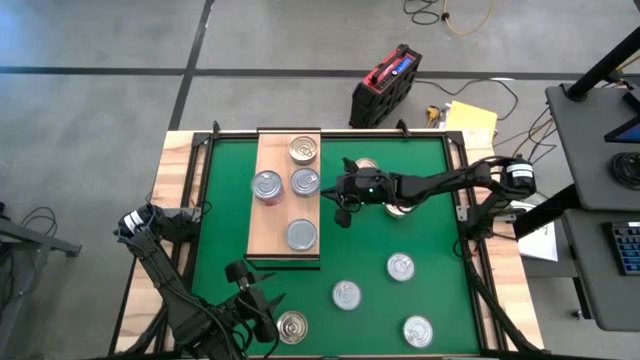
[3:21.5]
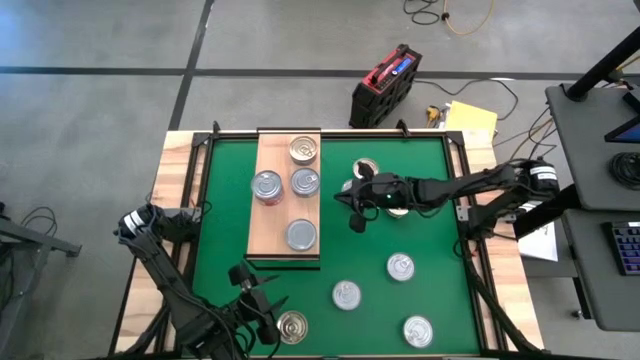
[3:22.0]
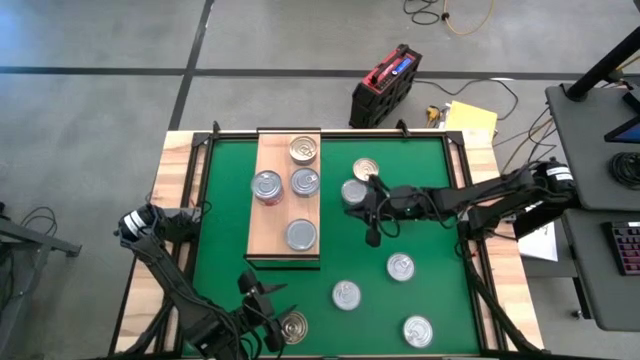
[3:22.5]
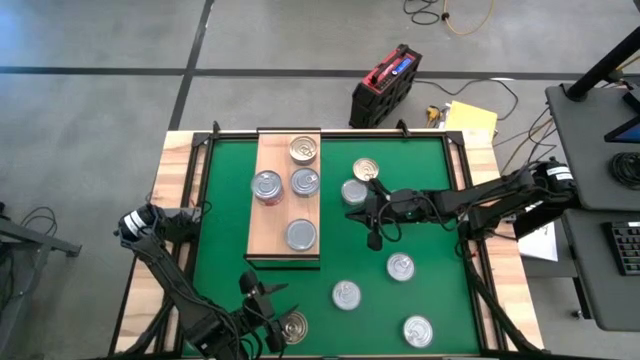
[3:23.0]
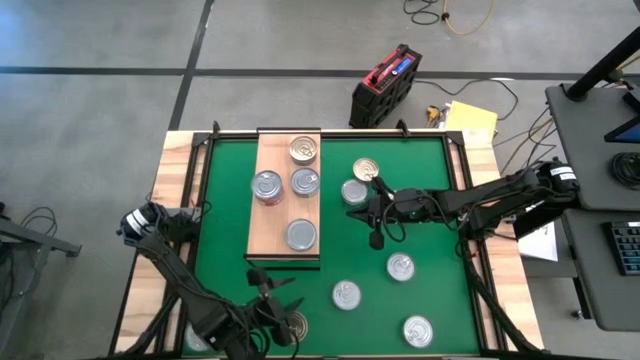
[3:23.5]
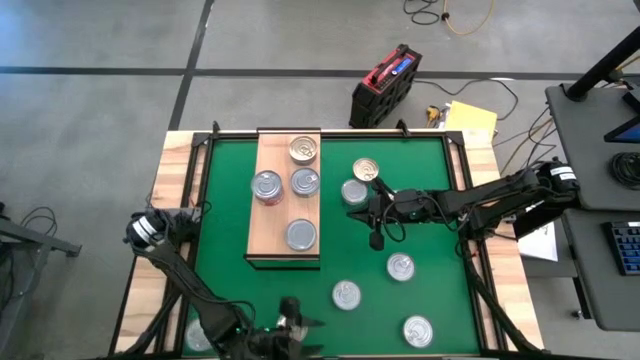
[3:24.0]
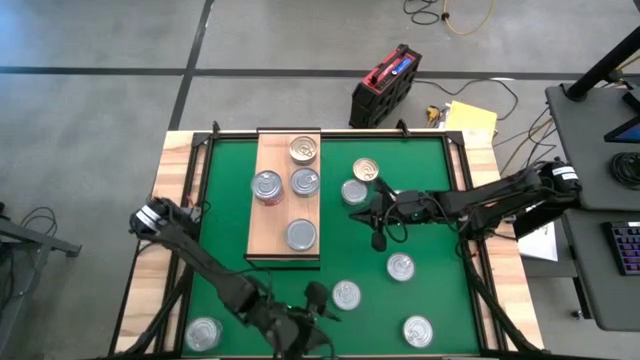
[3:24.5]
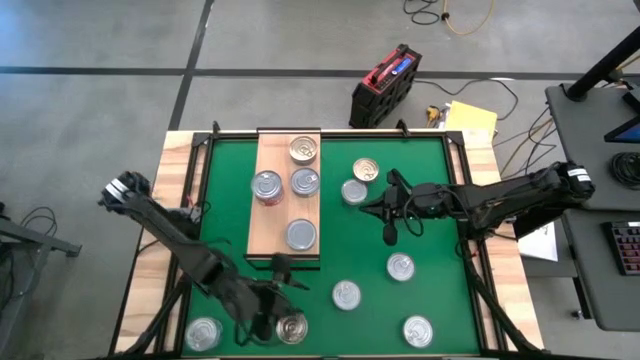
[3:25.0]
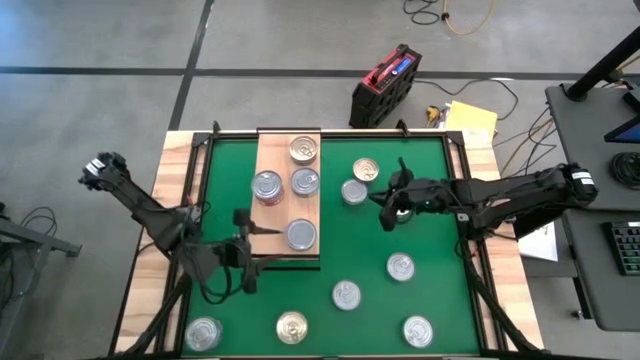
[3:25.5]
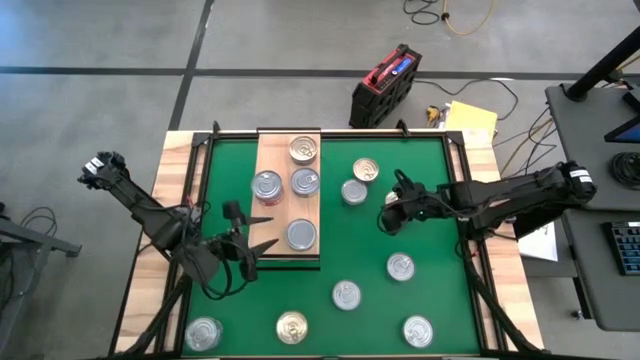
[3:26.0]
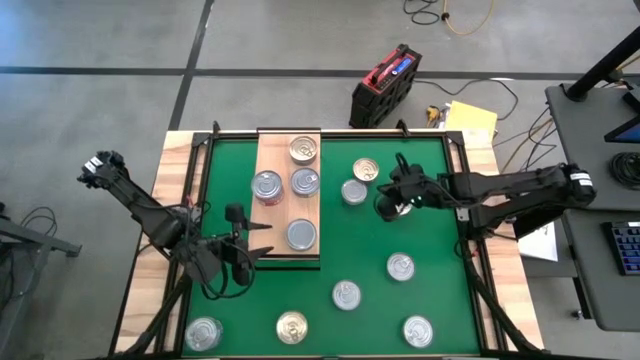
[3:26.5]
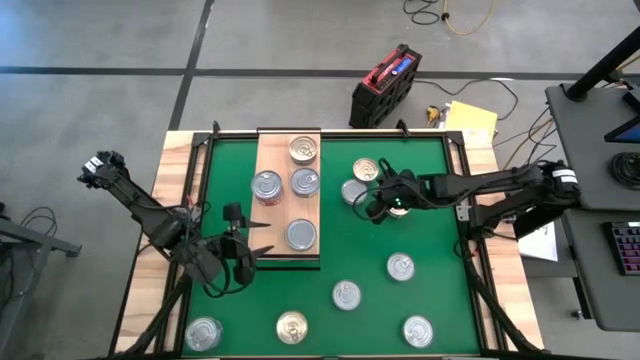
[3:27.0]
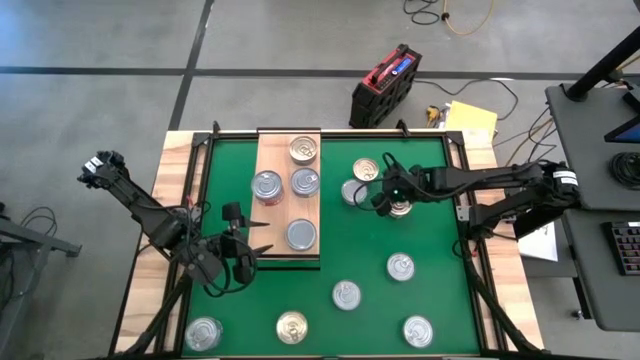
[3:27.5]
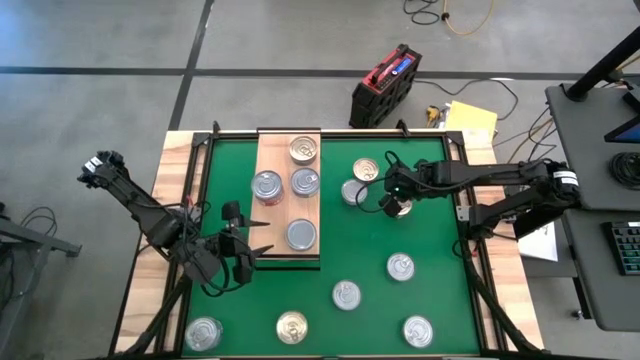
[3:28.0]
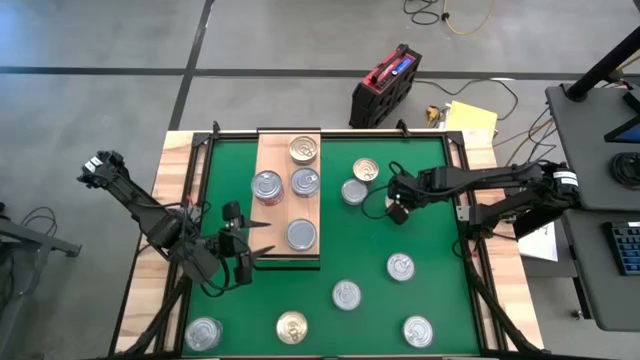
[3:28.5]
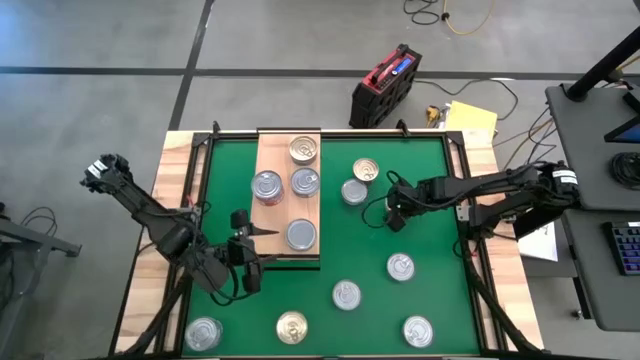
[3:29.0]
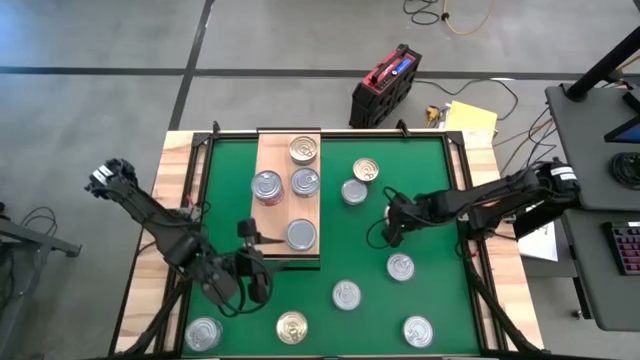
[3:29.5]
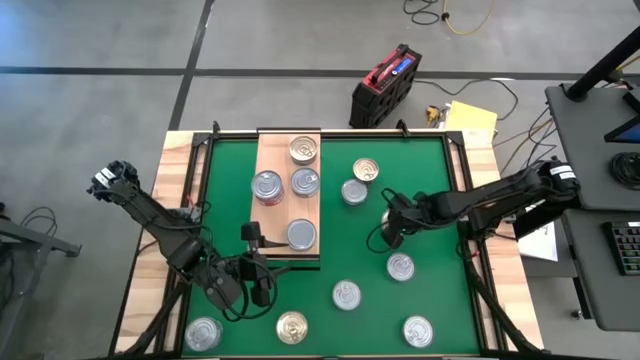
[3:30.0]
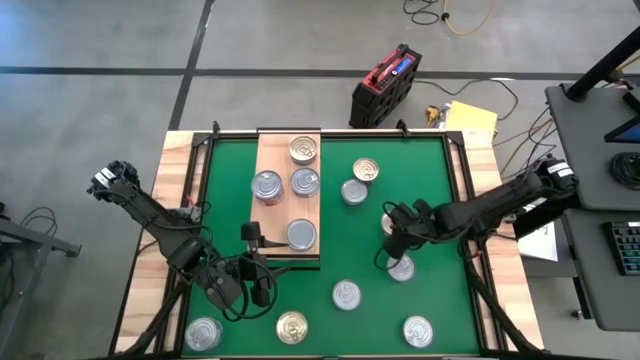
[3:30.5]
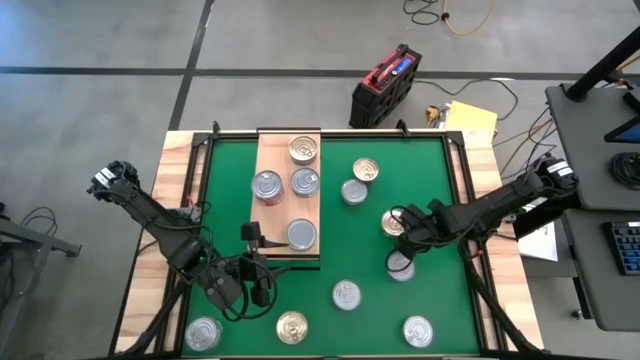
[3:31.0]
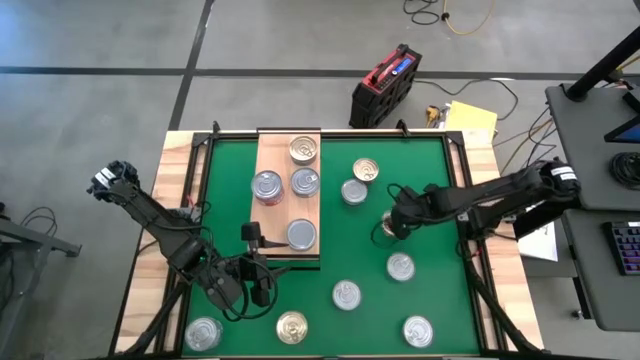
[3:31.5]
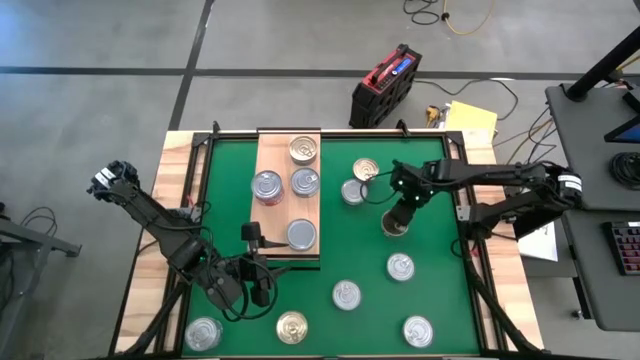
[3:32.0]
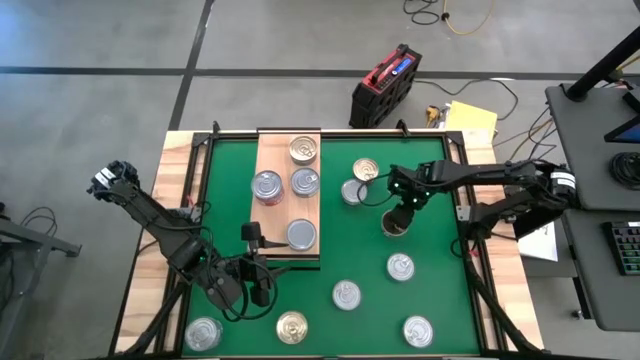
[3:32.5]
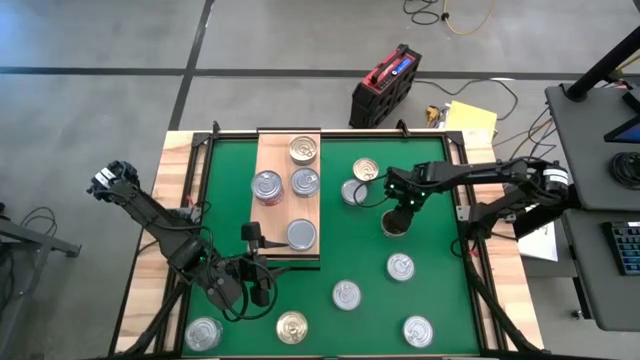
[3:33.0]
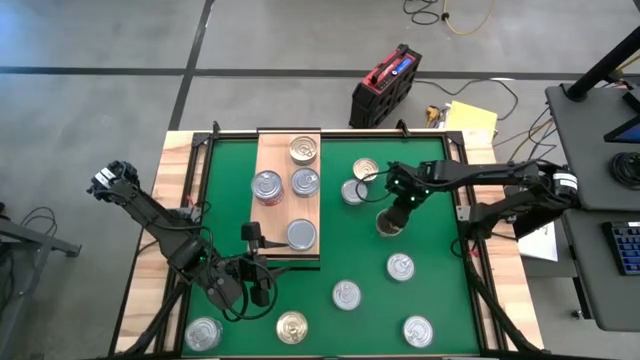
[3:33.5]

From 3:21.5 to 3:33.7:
Task: Stack canned seafood by type on shelf
Stack the blue and pink tuna can on top of the blue tuna can on the shelf

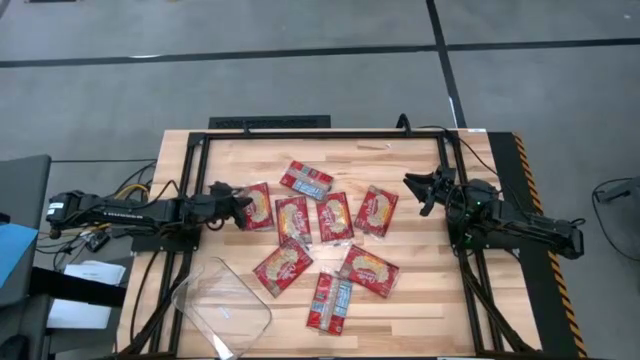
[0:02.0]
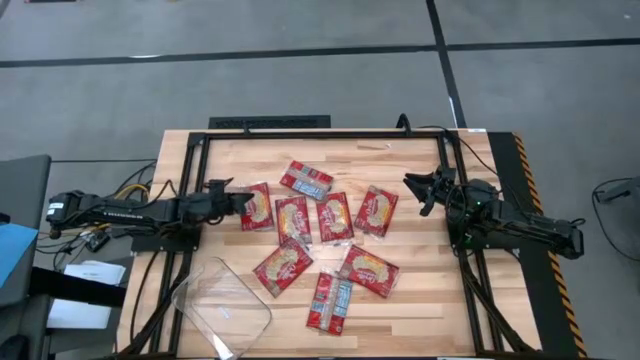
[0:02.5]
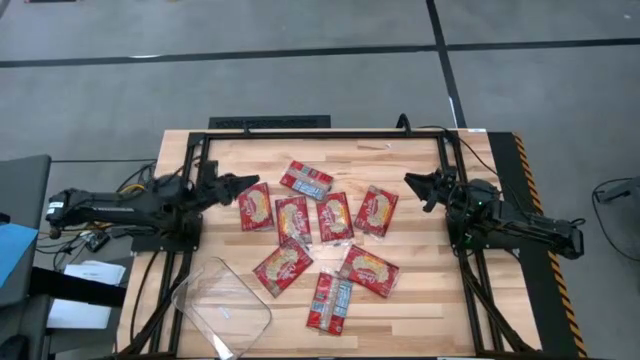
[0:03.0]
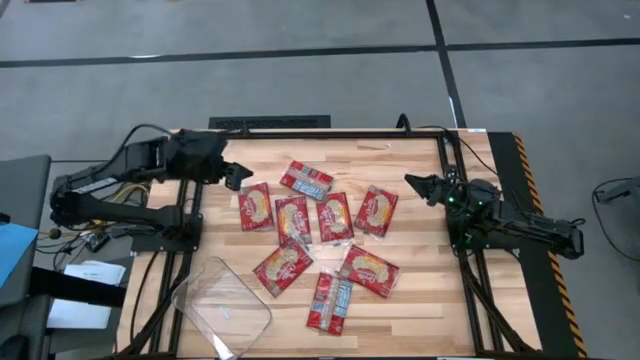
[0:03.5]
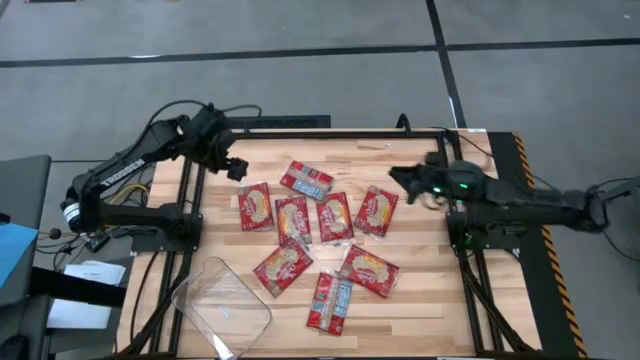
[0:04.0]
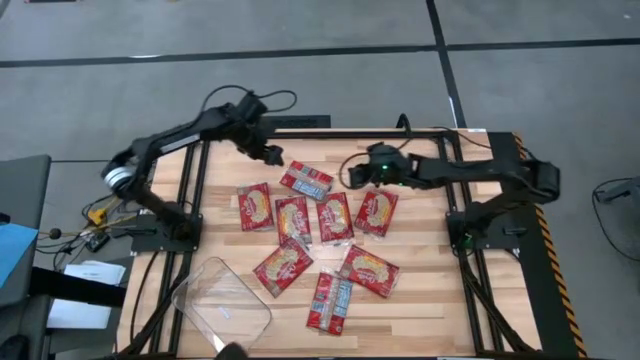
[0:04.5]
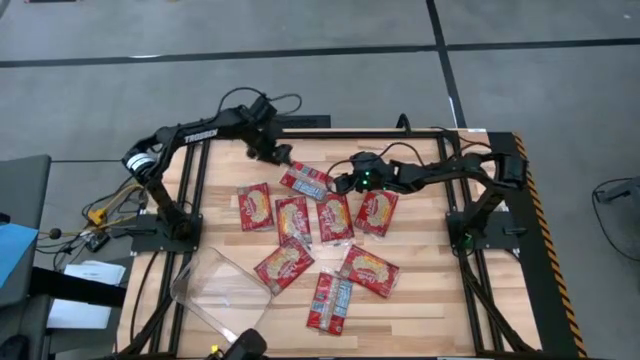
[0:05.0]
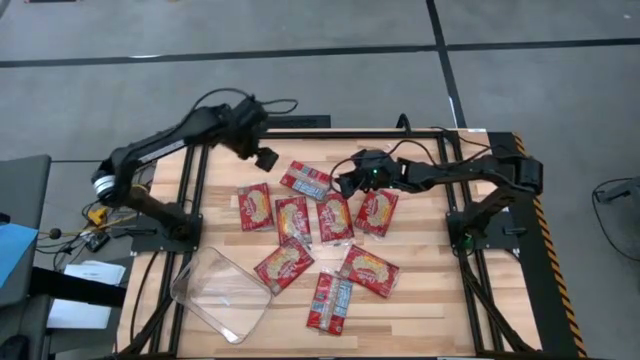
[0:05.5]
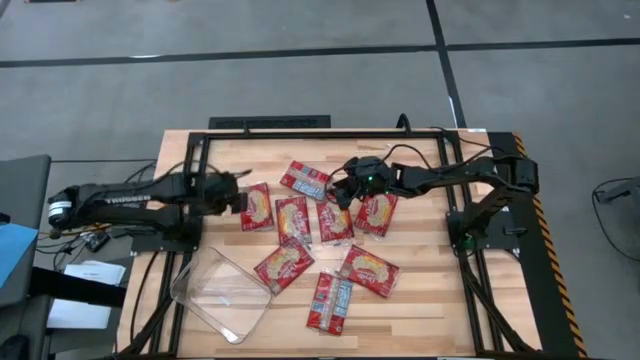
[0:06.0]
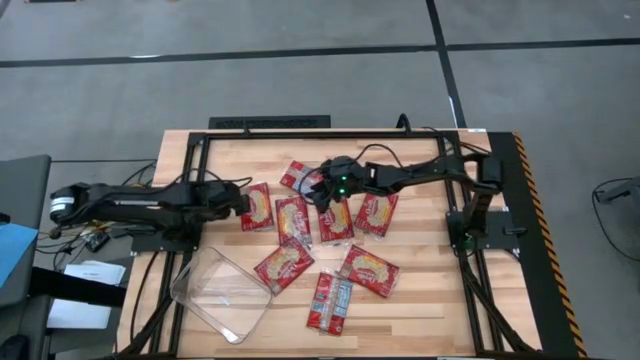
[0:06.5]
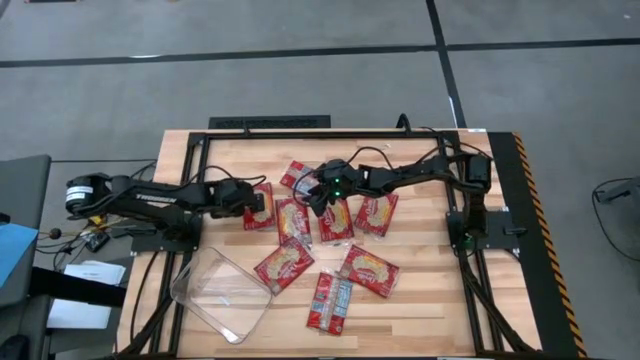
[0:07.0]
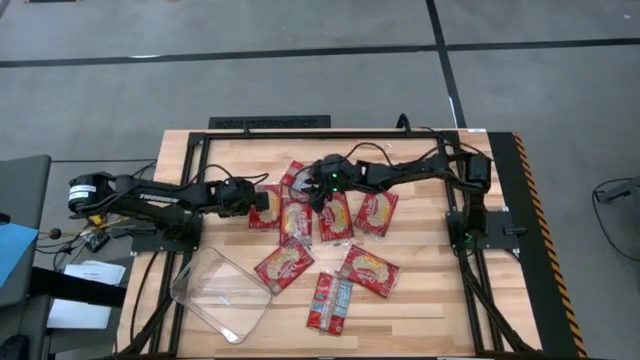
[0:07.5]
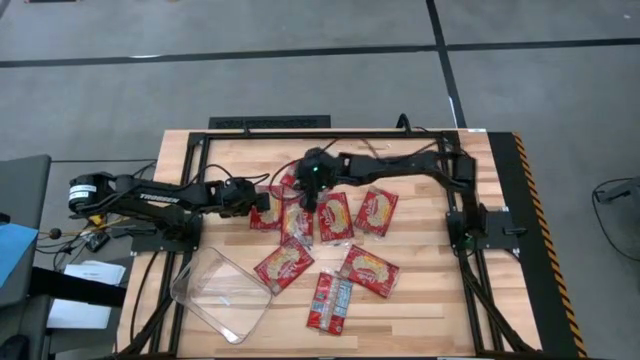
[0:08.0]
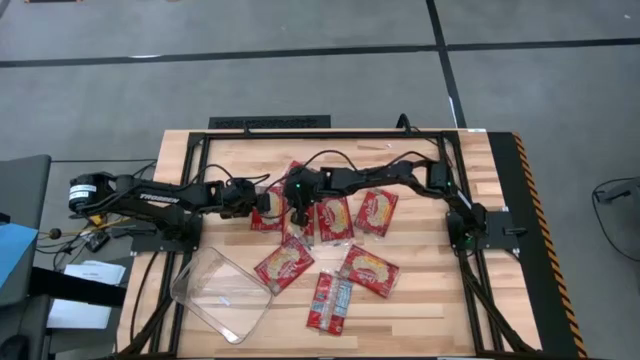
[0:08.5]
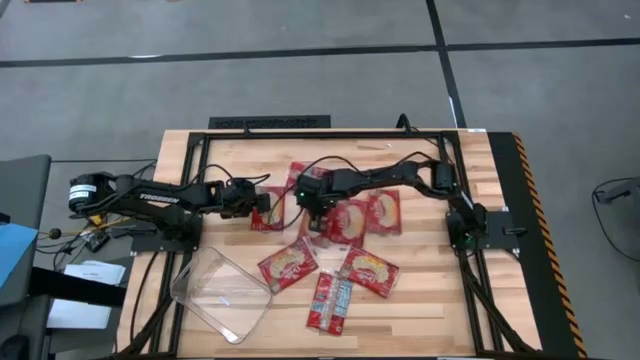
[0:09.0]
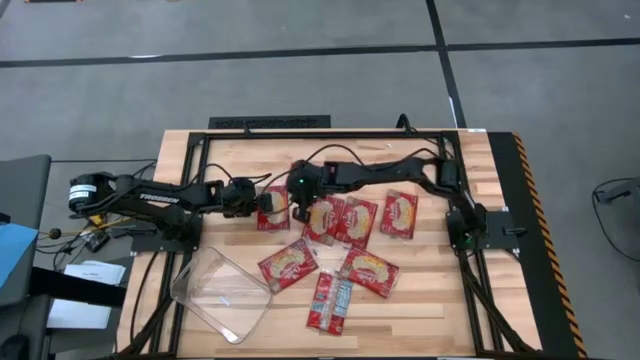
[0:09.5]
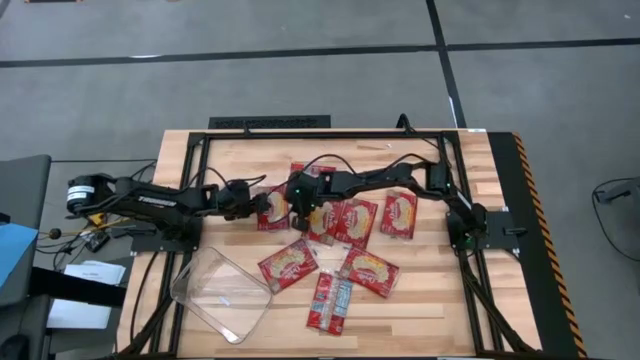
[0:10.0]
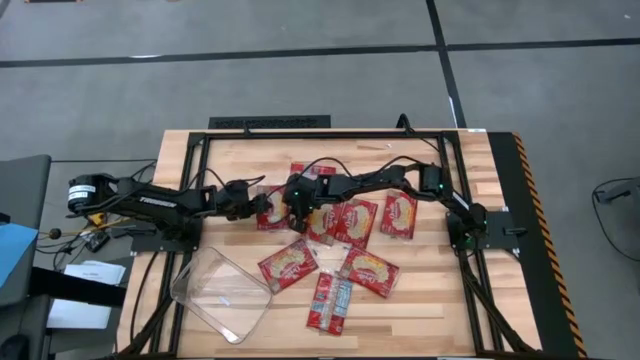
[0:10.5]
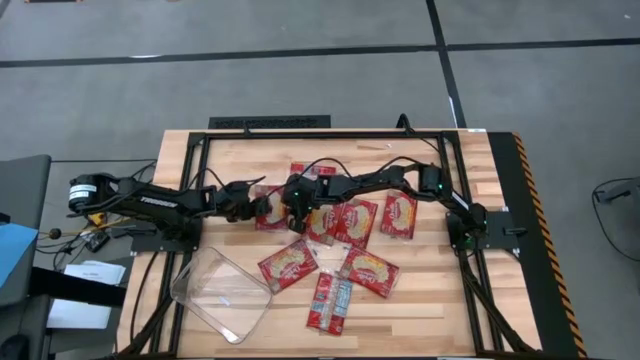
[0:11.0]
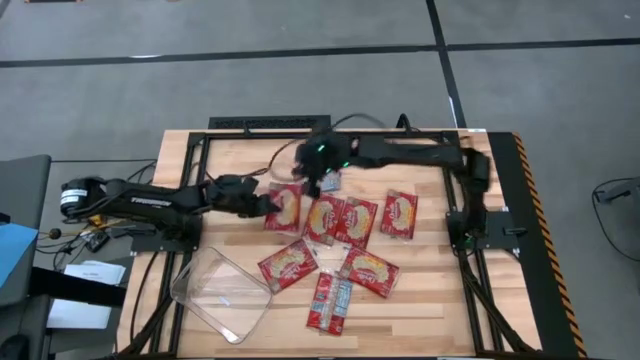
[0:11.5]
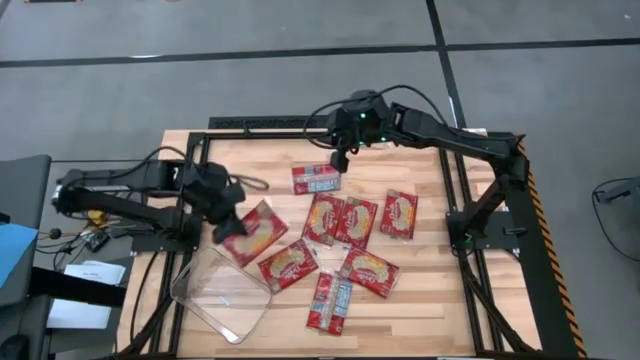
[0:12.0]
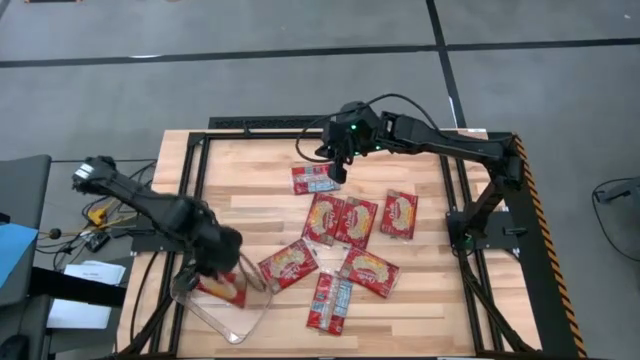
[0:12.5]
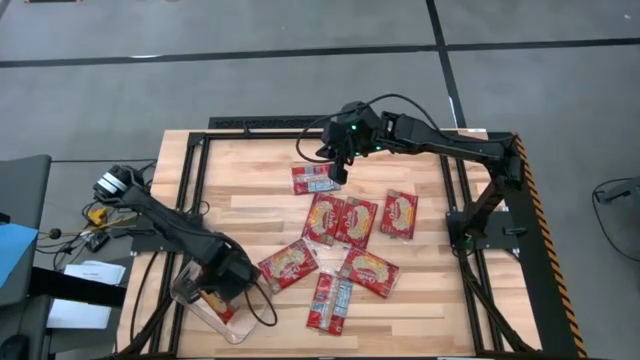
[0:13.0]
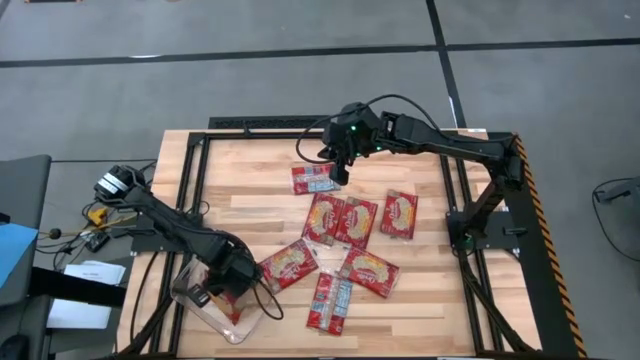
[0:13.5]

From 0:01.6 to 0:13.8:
Task: Sort popcorn bags into baskets
Put the red popcorn bag into the transparent bin
